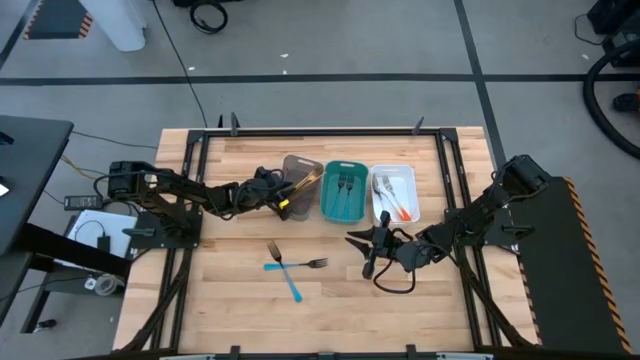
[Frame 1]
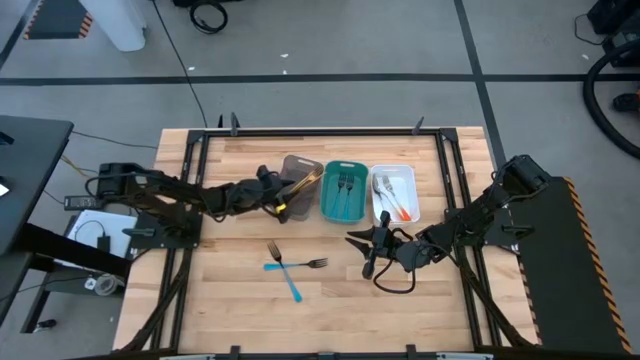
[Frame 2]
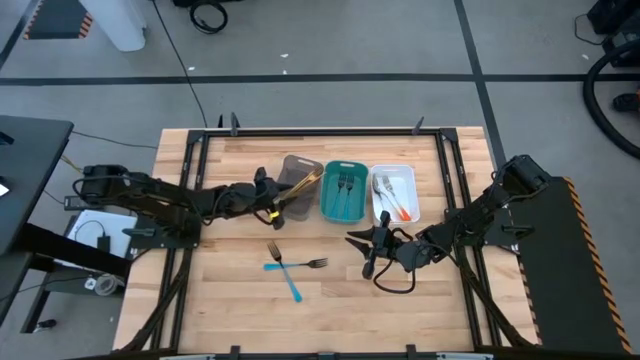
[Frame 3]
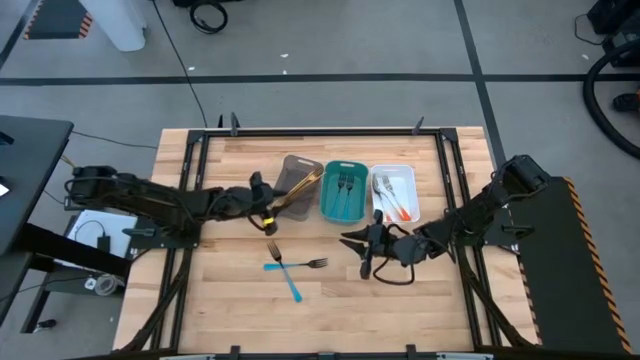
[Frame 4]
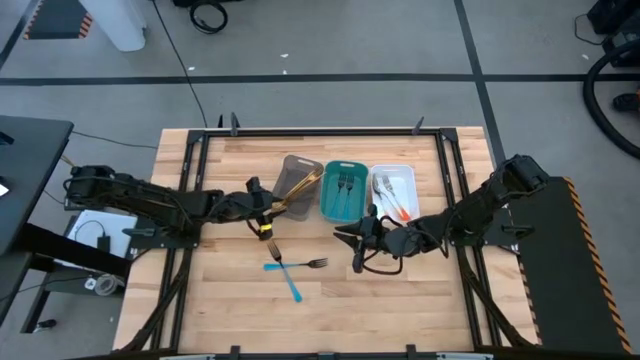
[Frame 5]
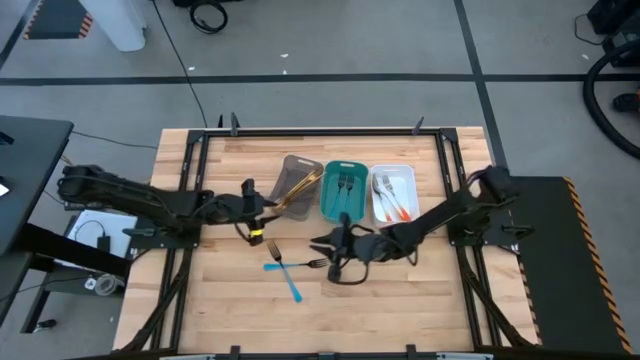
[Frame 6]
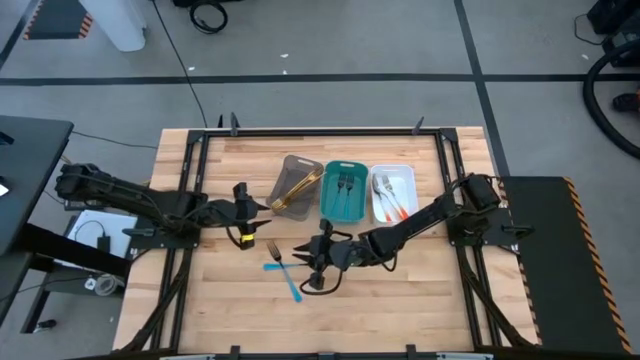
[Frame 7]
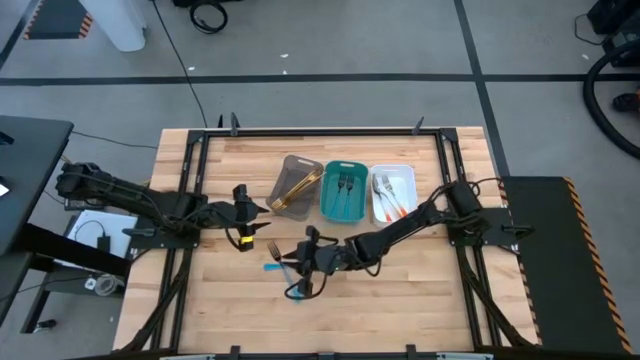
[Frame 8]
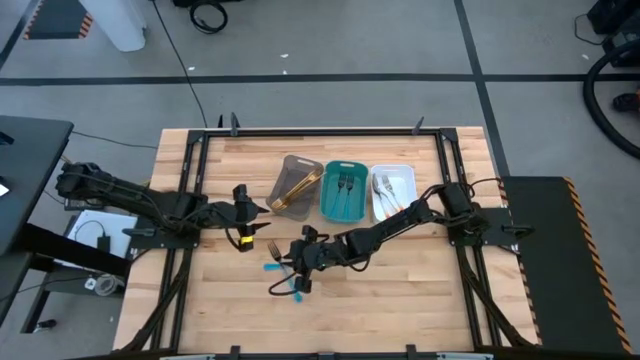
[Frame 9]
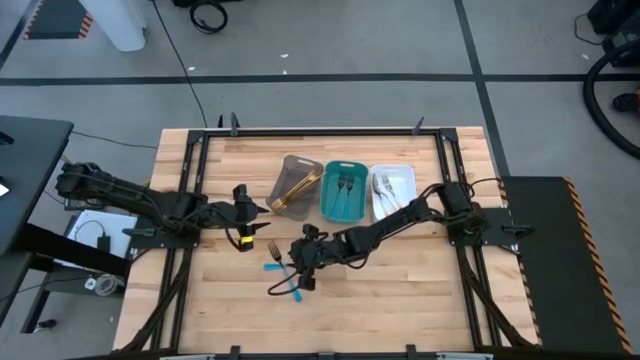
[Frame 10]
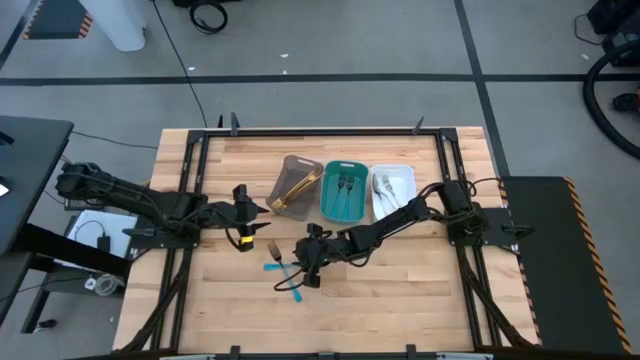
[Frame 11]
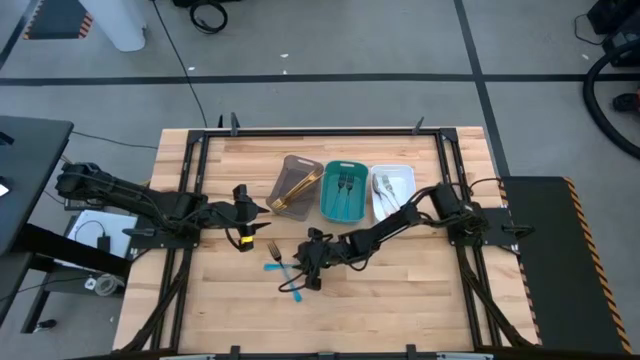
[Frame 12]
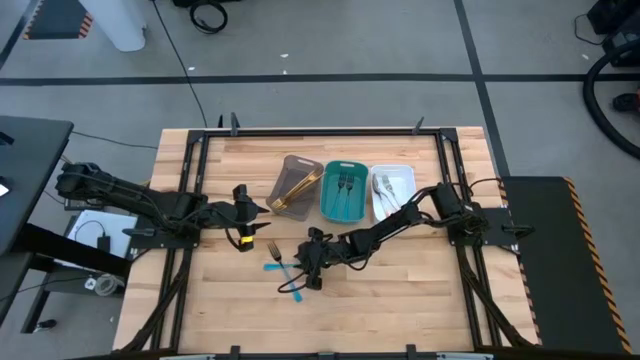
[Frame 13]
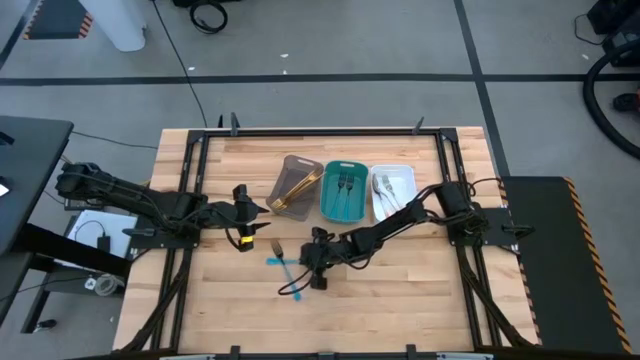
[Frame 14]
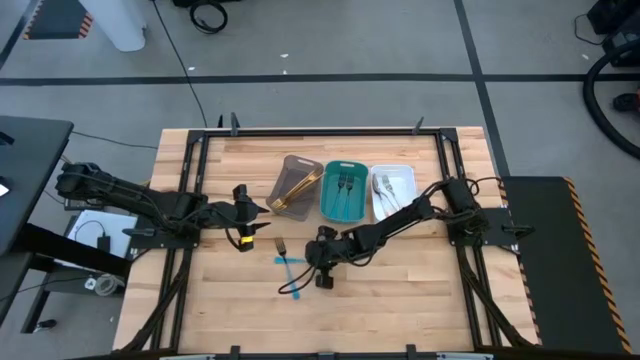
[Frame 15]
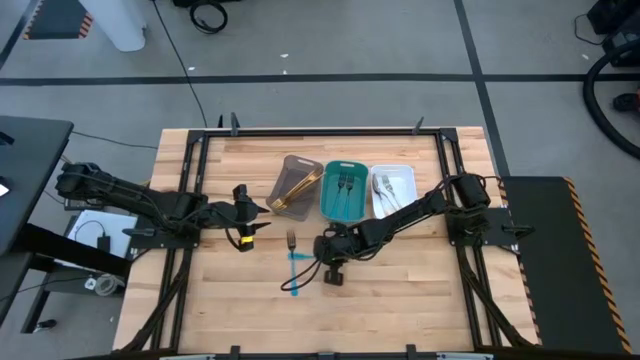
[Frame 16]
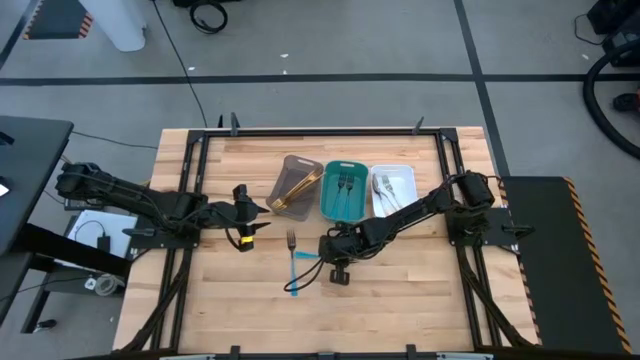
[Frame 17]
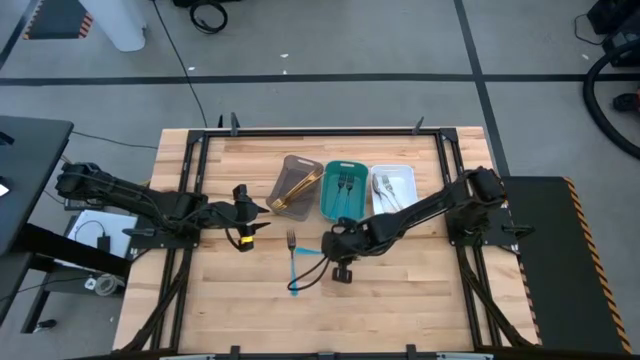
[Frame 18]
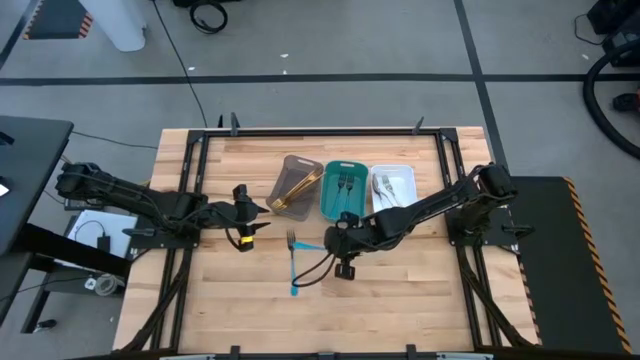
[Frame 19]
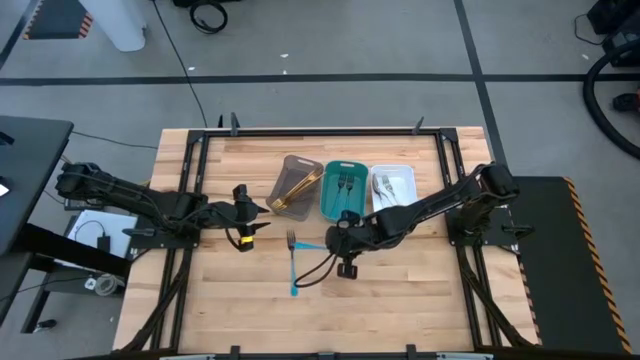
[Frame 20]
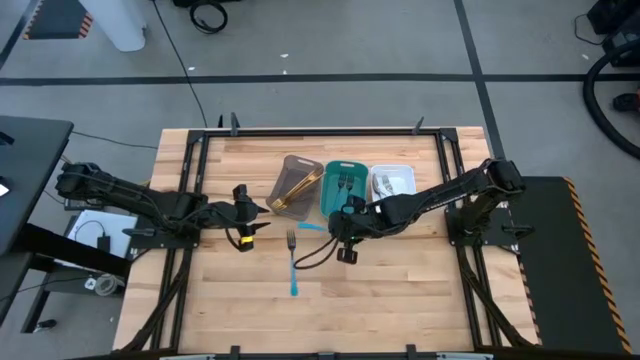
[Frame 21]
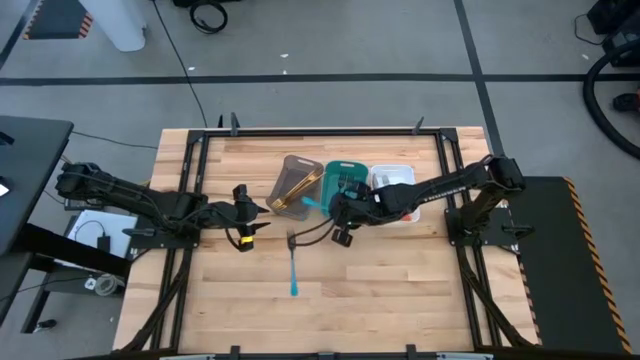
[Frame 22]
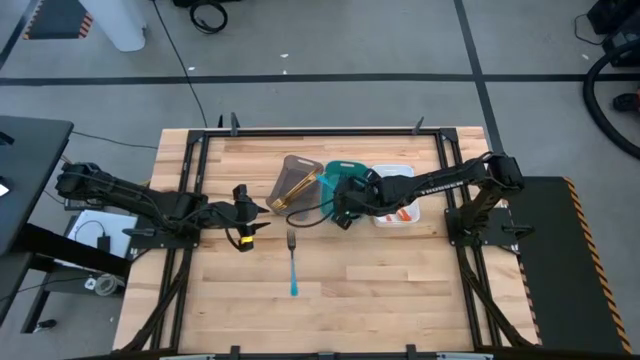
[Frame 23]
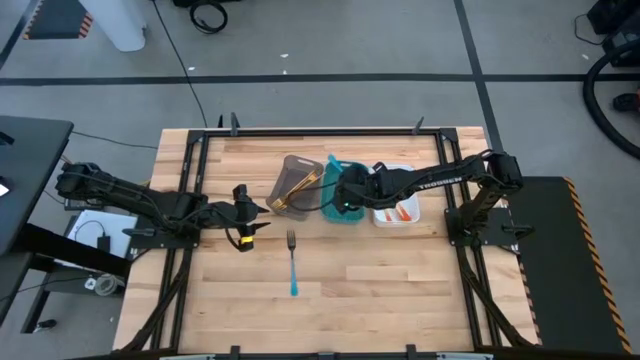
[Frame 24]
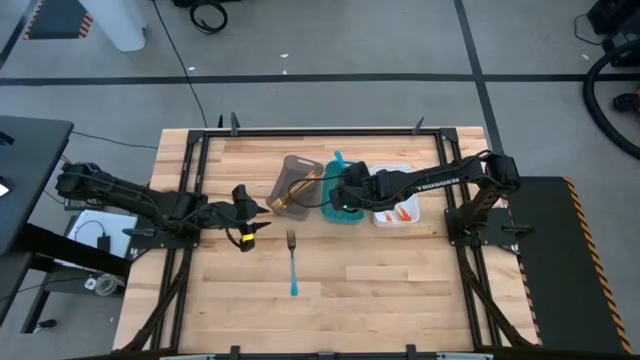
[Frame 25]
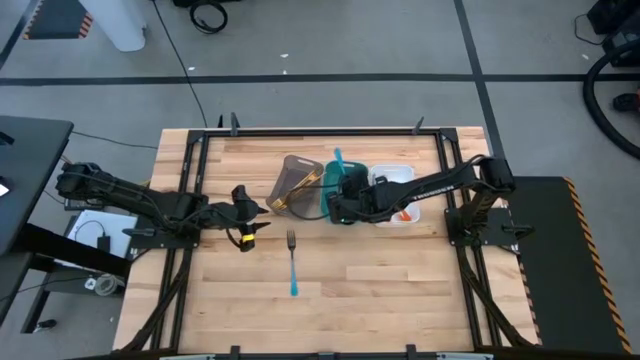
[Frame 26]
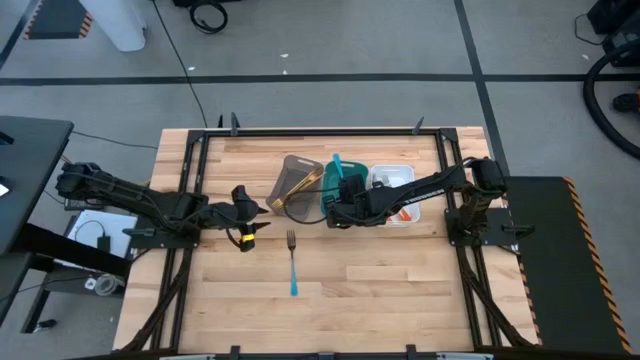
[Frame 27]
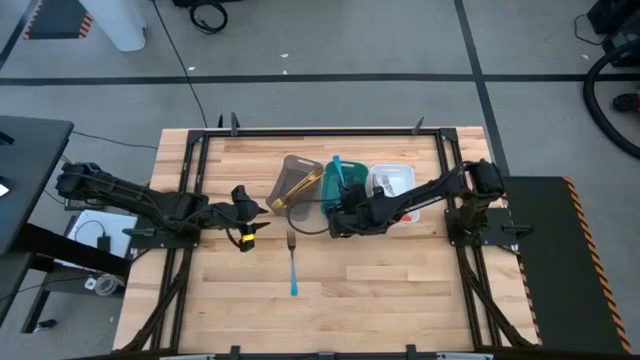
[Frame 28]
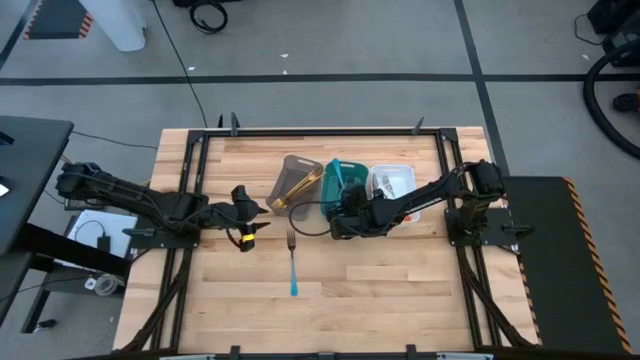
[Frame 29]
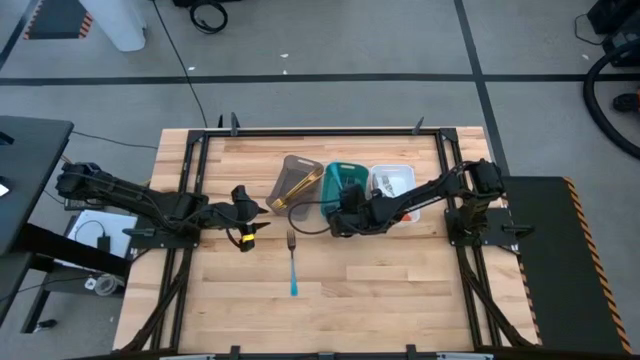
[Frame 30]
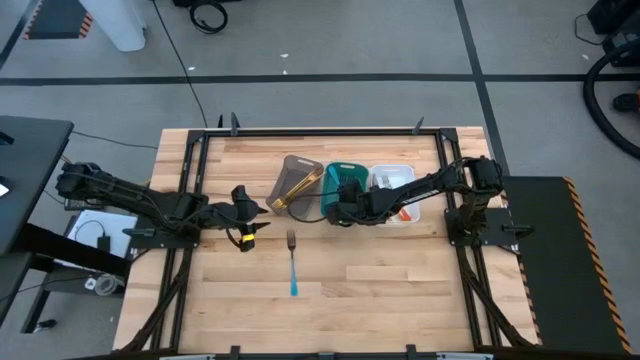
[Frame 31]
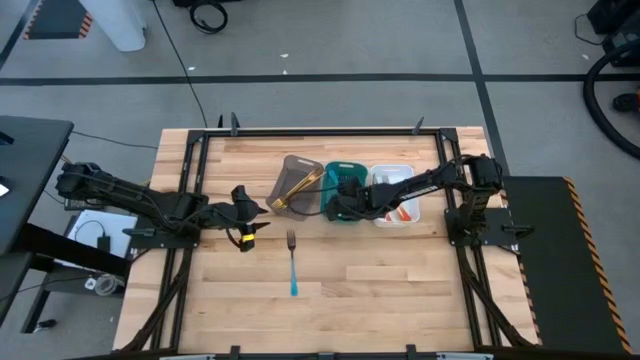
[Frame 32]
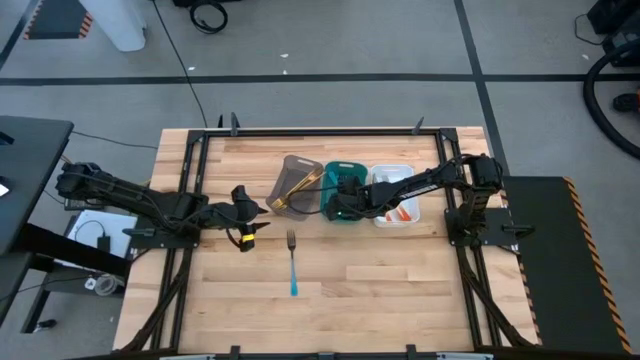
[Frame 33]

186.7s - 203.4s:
Task: Sort silverware by color (type)
Put the blue fork into the green bin

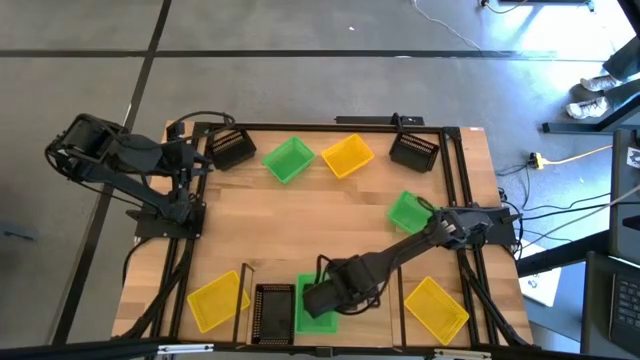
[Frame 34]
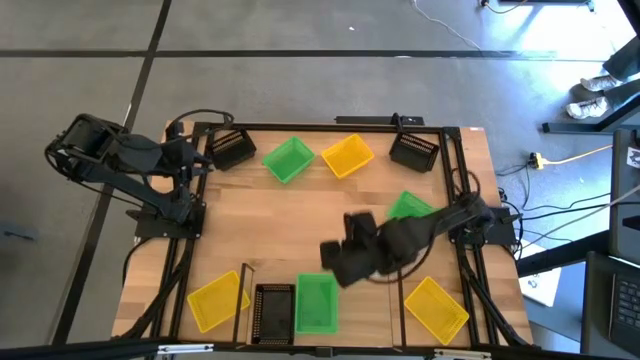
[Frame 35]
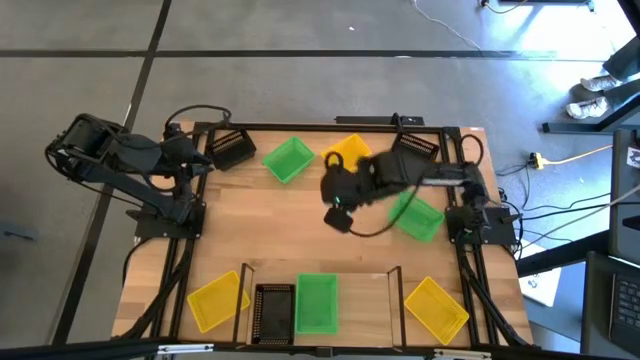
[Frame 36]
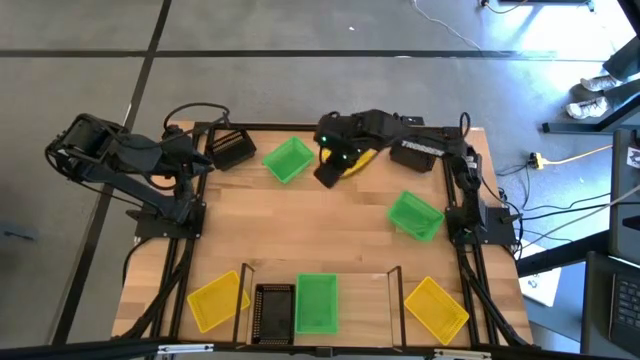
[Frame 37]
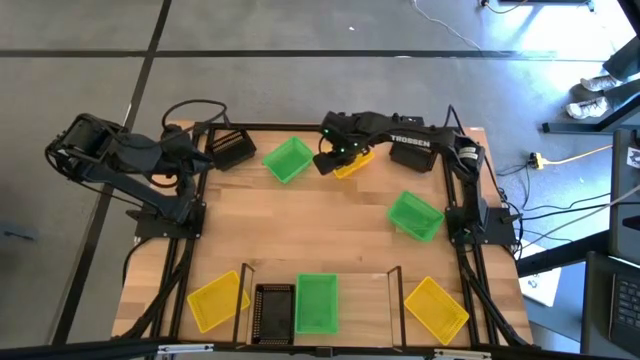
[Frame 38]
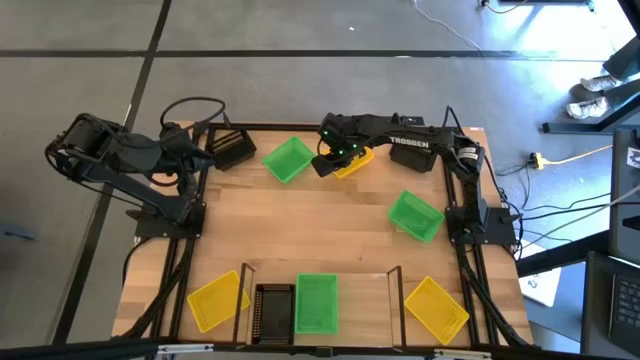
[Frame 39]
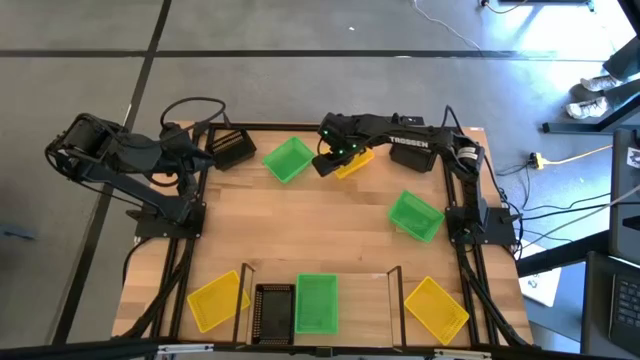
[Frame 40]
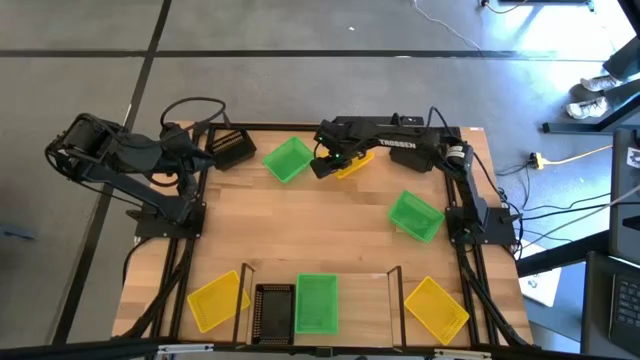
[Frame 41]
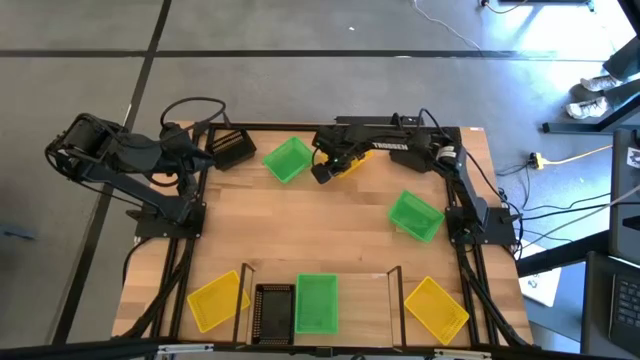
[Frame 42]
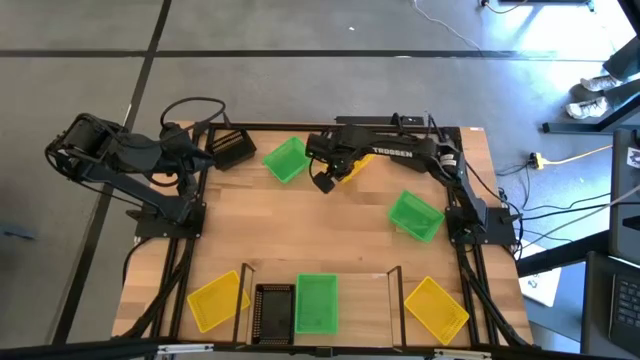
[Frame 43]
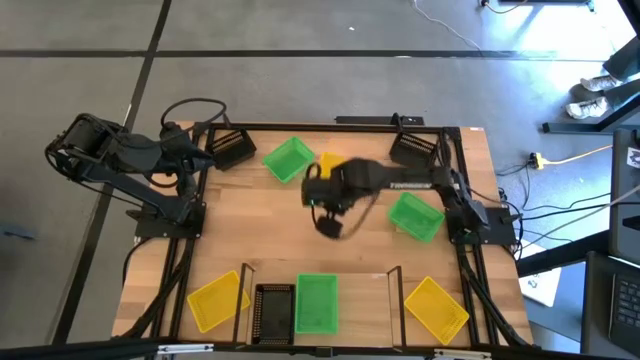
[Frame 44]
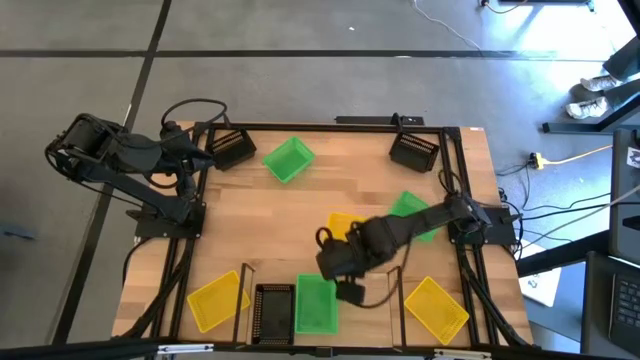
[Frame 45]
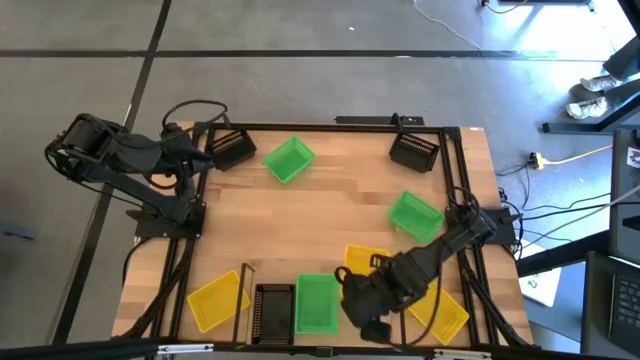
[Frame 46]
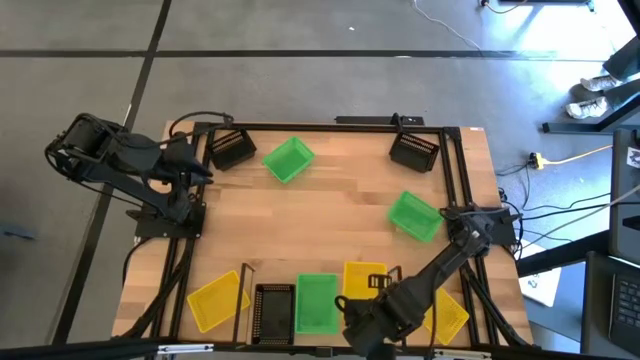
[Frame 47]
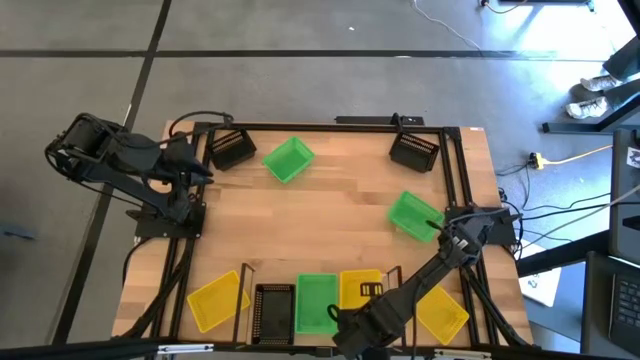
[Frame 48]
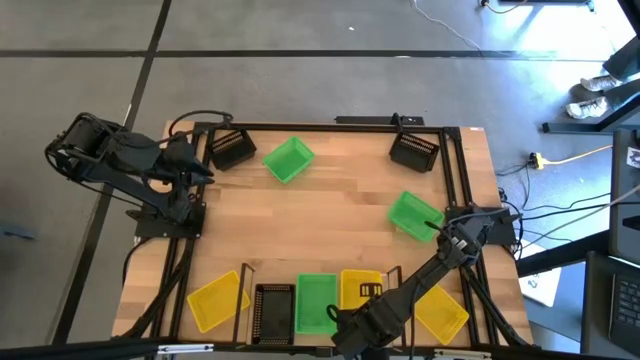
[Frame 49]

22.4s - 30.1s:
Task: Stack baskets on shelf by color
Put the top yellow basket on the shelf
